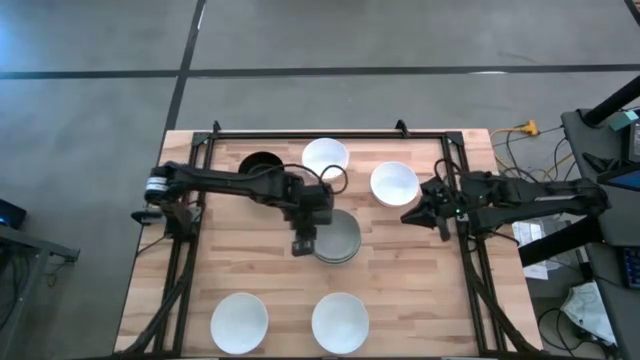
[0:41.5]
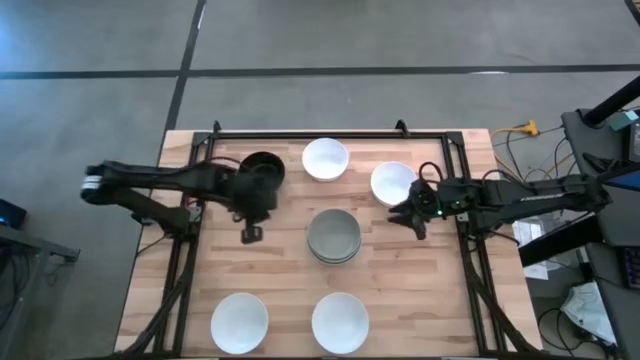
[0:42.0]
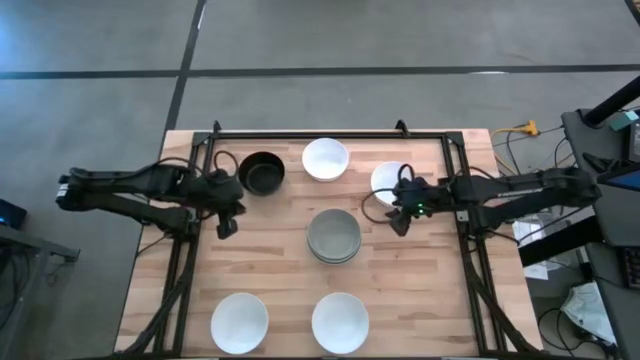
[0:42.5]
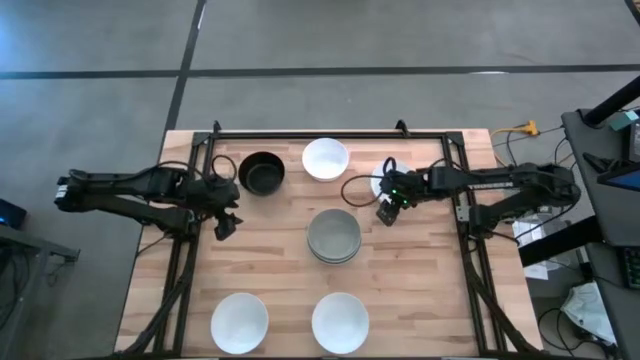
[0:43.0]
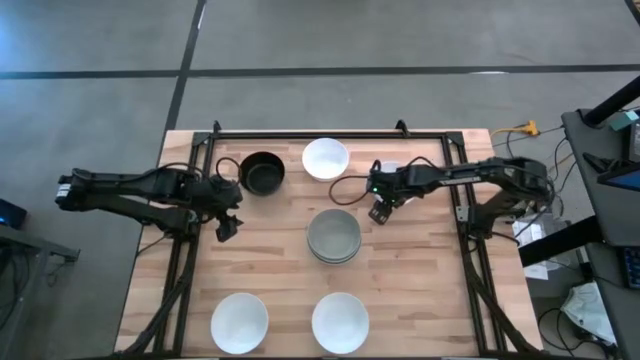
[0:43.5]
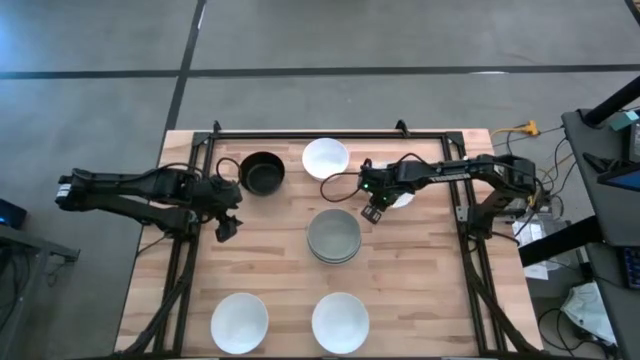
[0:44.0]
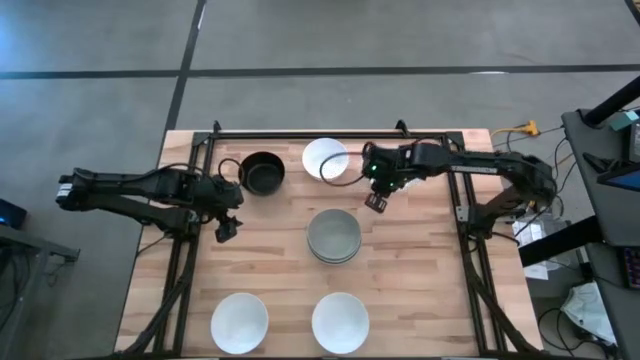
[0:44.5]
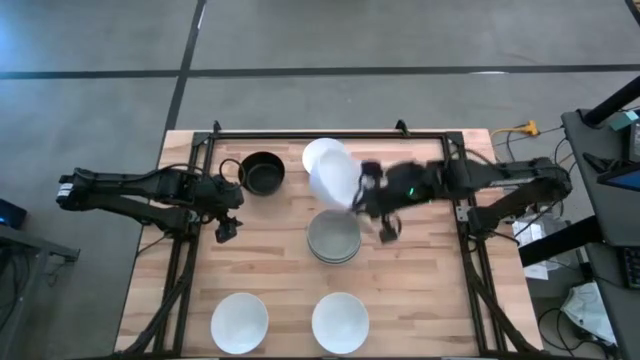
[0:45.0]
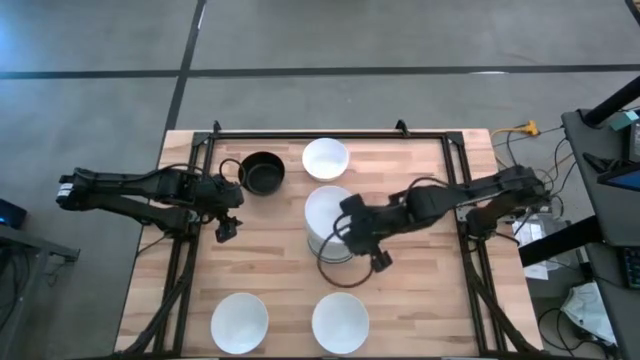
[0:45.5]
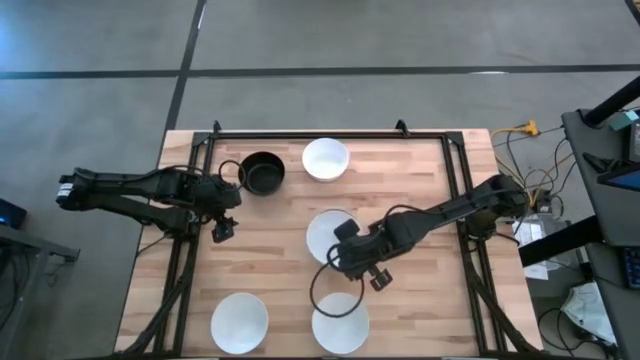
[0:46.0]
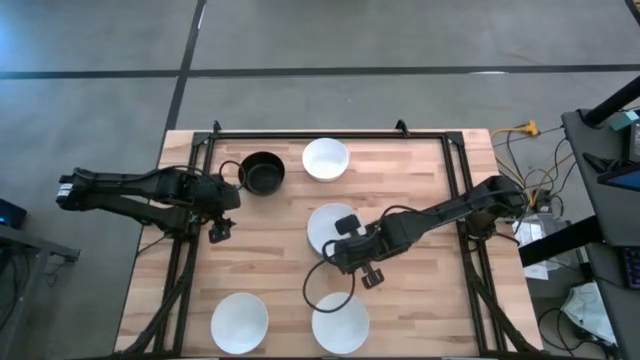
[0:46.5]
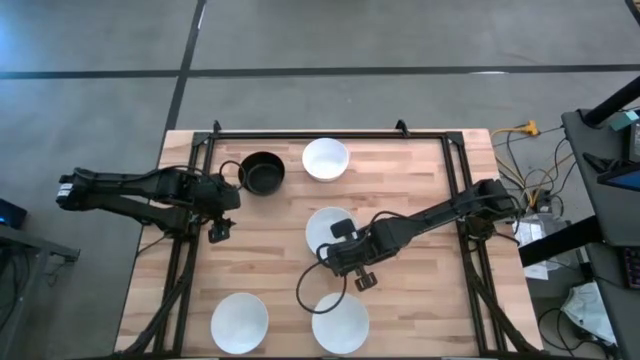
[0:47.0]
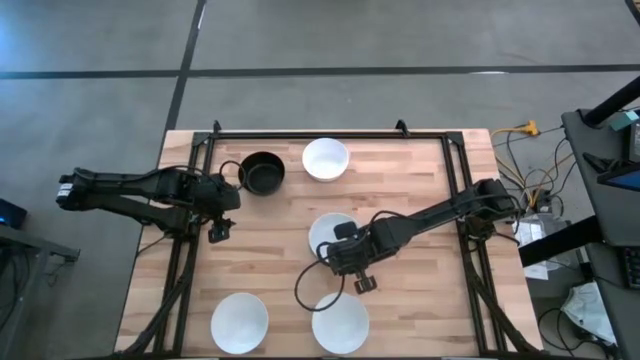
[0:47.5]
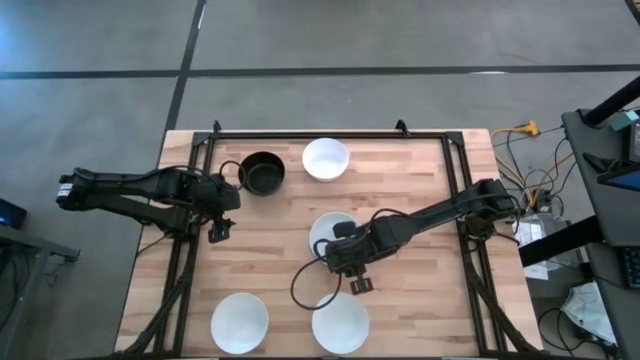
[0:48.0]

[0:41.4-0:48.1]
Task: Nest bowls inside each other
Stack the white bowl on the top of the gray bowl

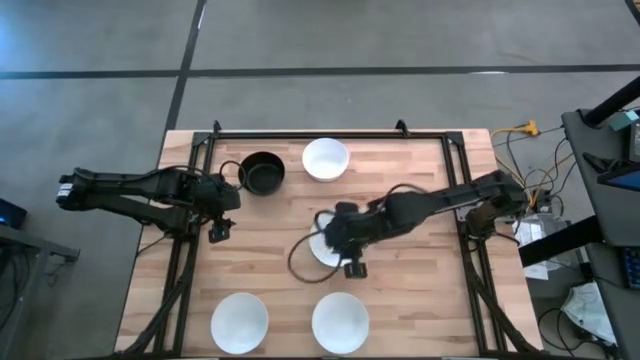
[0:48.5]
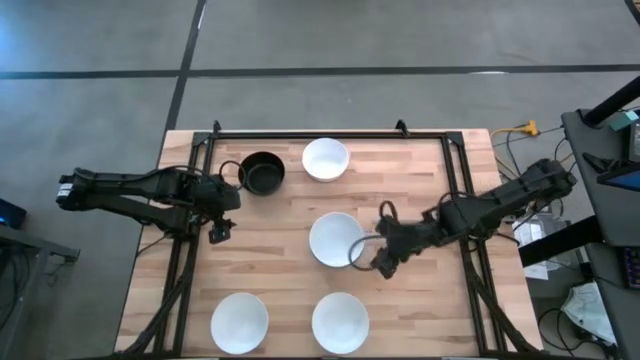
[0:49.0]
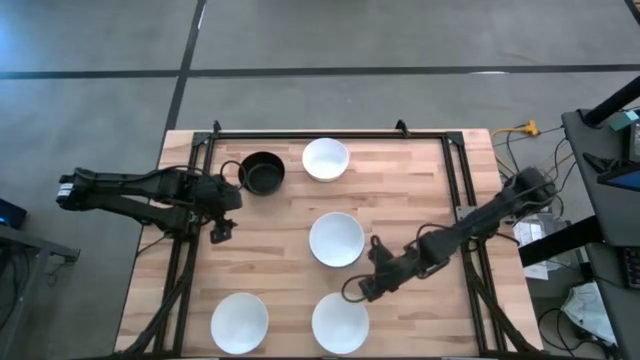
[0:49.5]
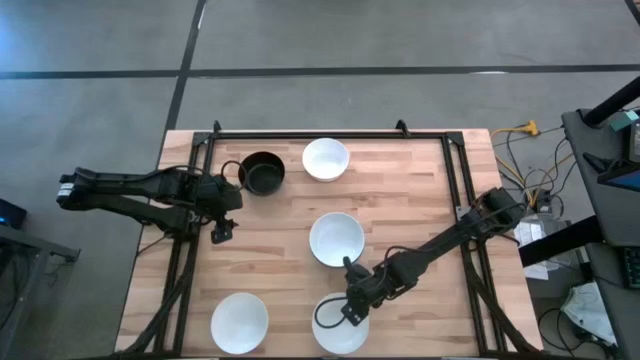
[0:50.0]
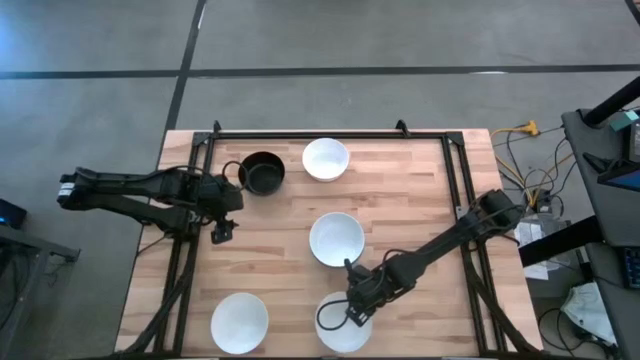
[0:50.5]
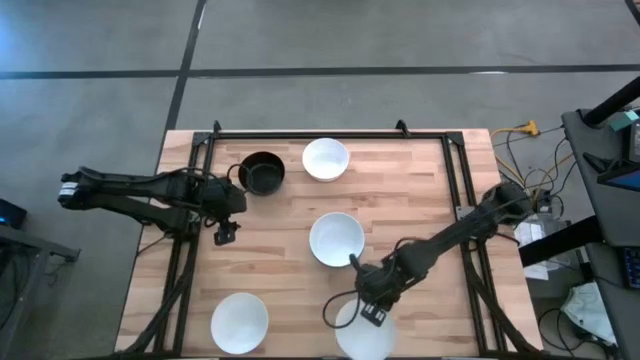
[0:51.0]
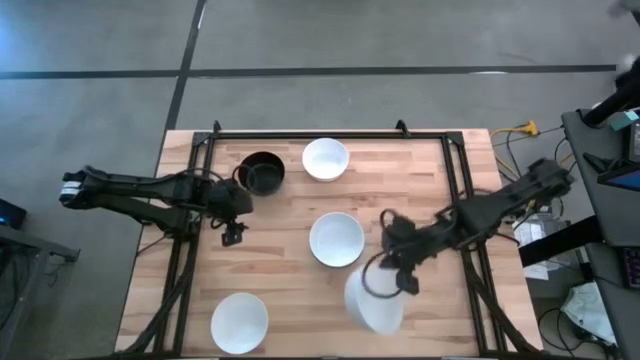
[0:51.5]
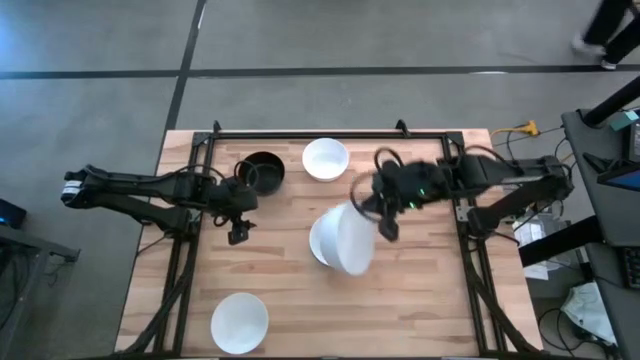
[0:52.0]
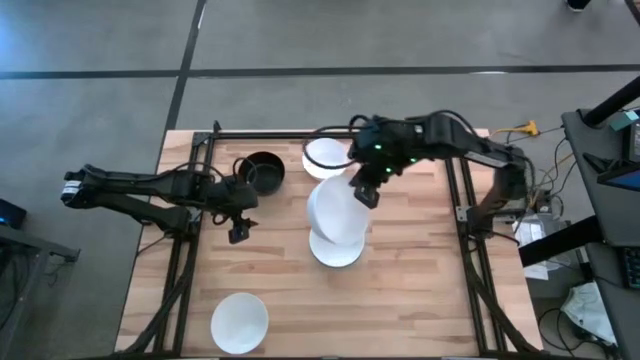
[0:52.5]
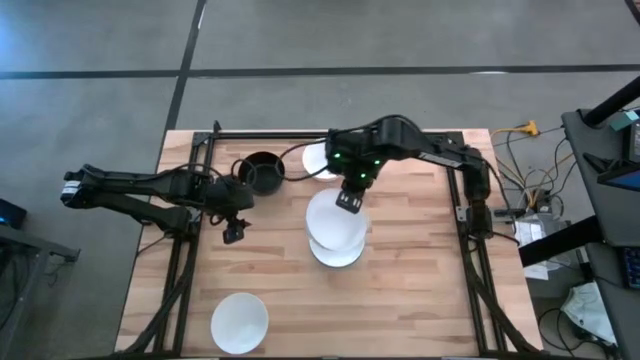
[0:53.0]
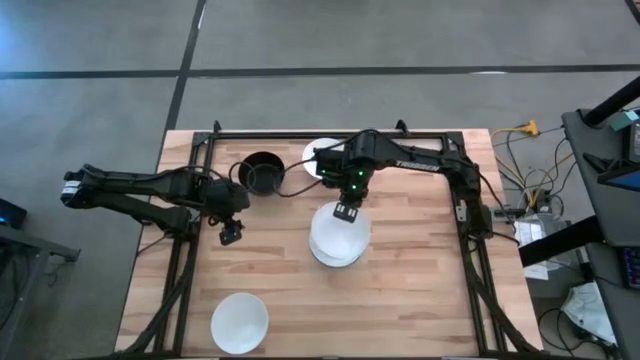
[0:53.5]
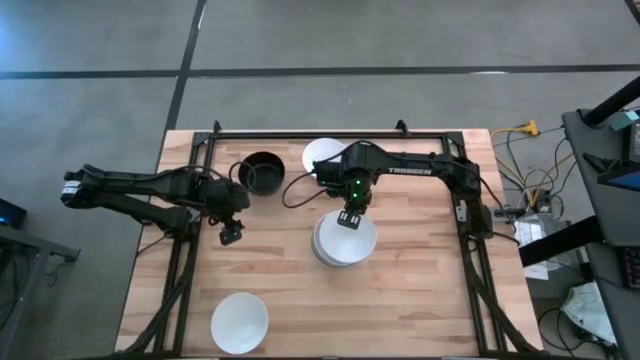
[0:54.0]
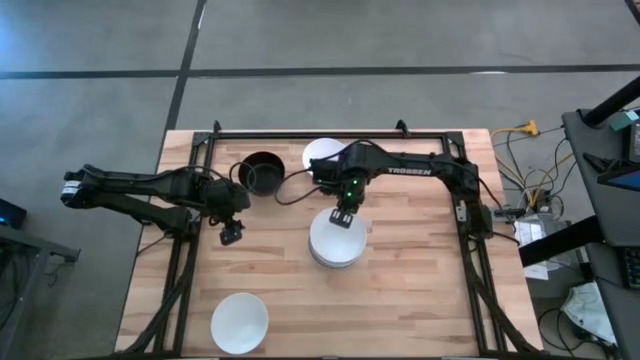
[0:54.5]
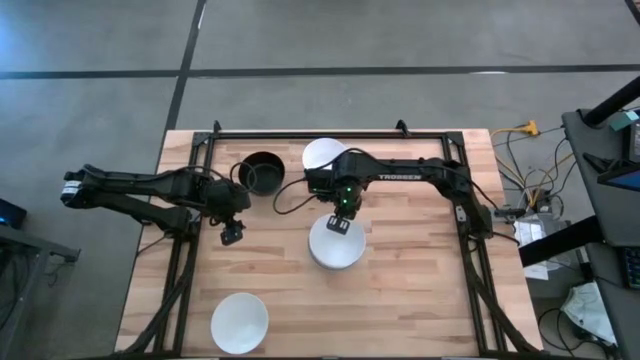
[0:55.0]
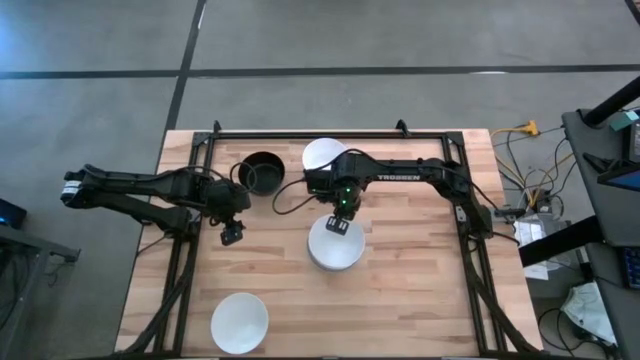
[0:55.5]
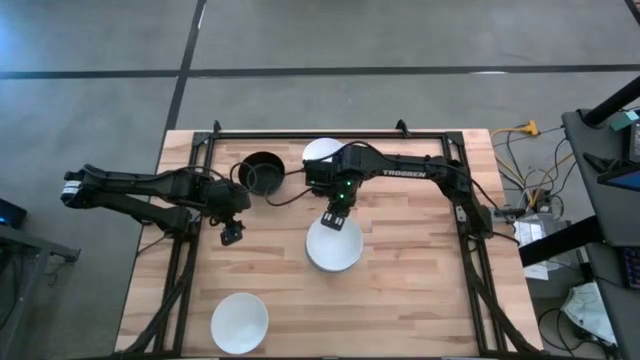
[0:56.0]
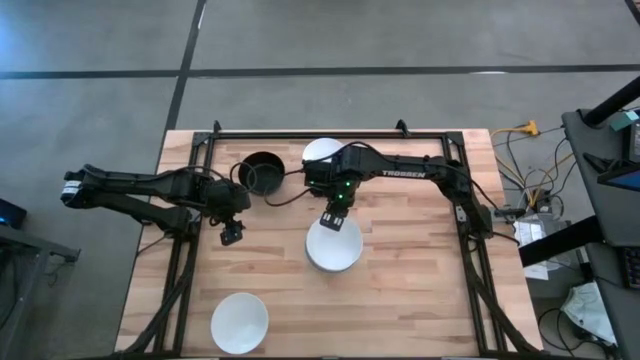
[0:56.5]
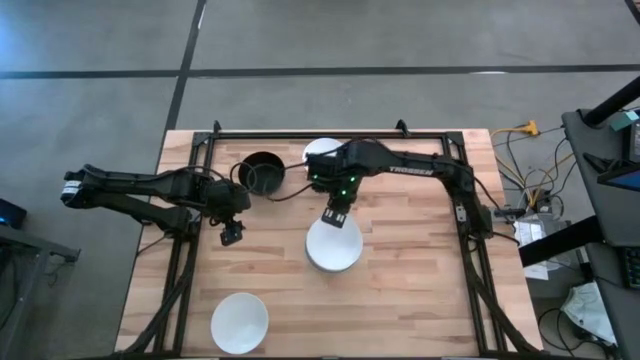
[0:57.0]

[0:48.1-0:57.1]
Stack the white bowl on the top of the white bowl

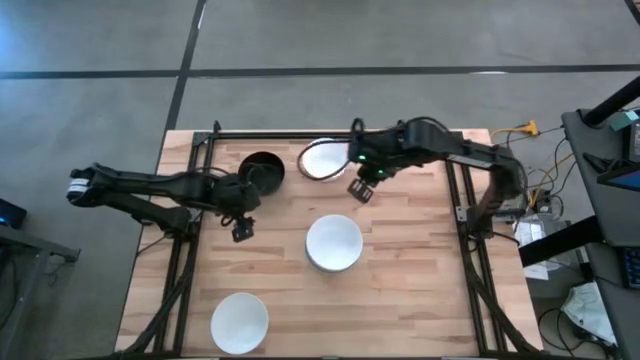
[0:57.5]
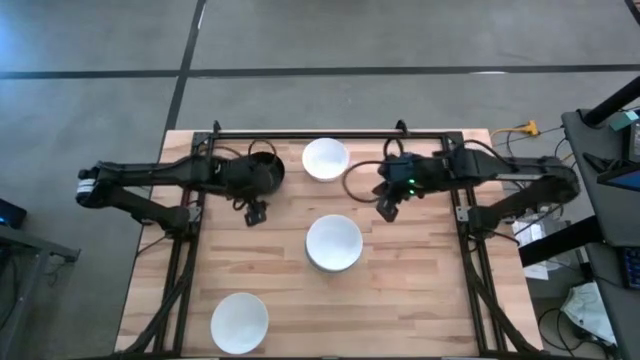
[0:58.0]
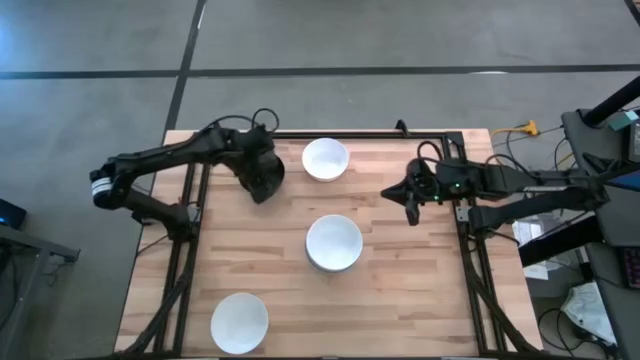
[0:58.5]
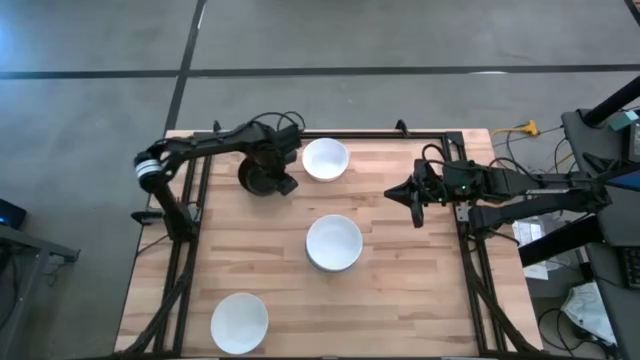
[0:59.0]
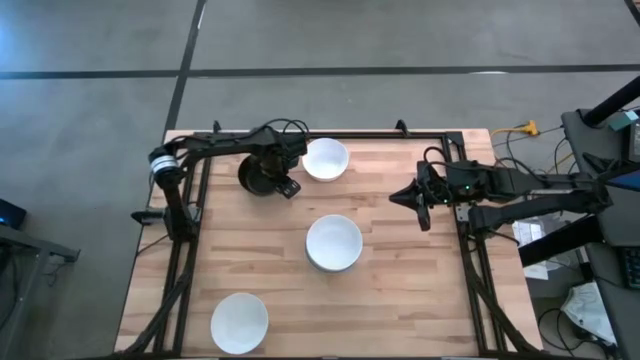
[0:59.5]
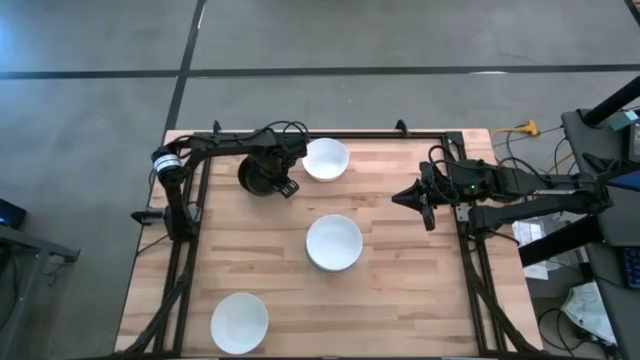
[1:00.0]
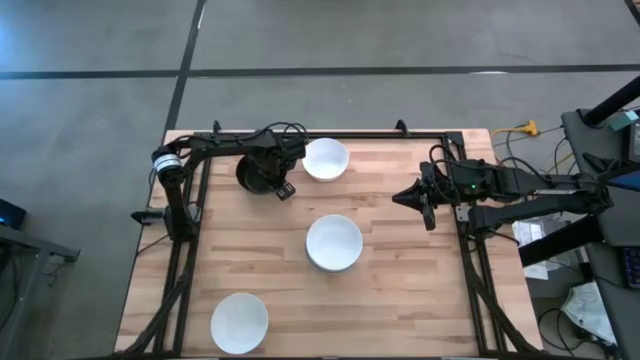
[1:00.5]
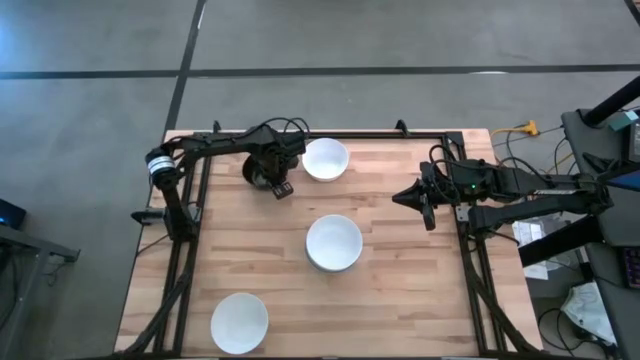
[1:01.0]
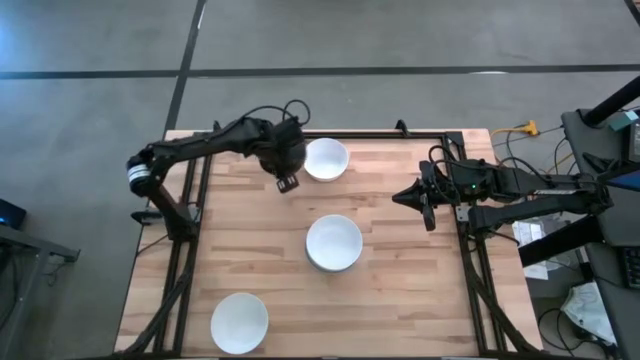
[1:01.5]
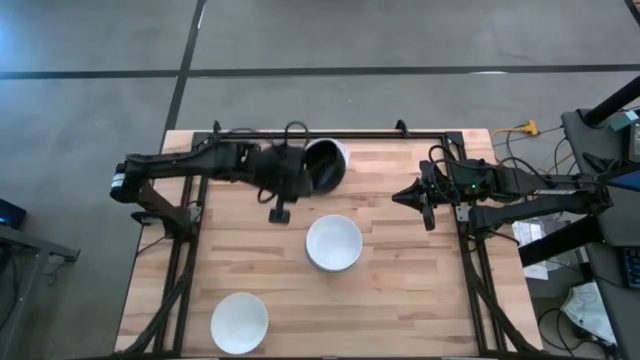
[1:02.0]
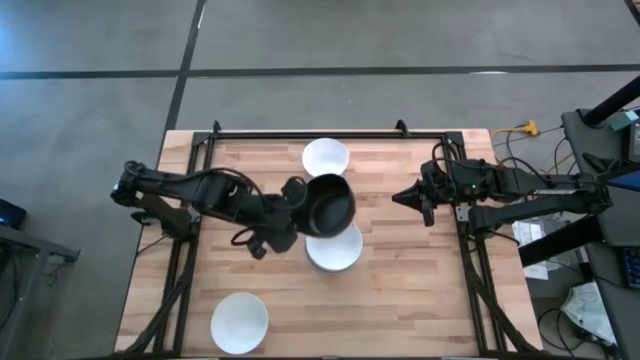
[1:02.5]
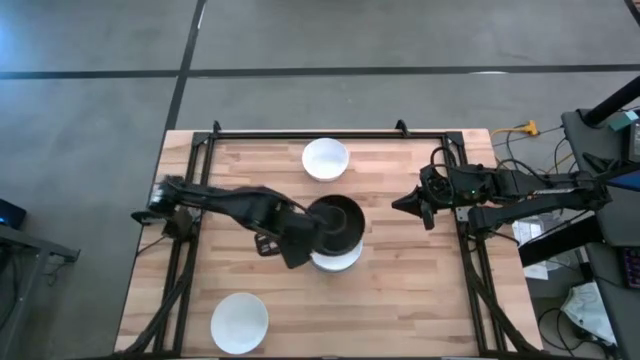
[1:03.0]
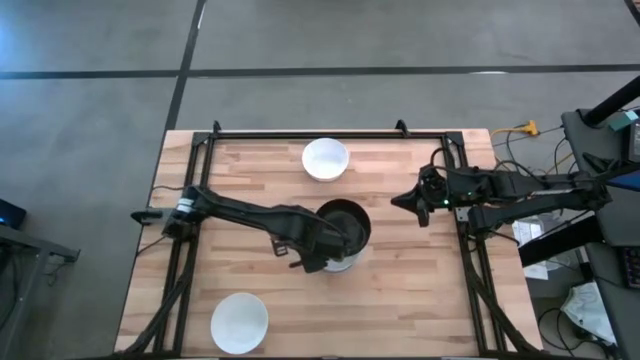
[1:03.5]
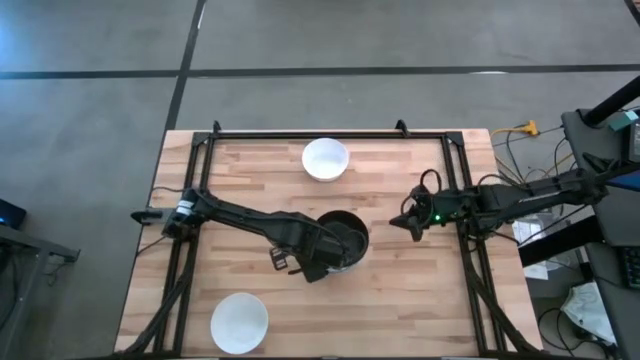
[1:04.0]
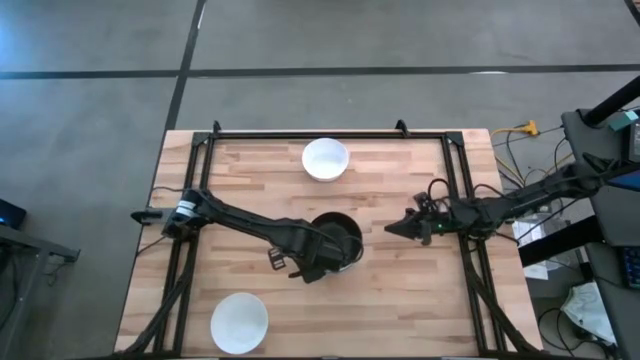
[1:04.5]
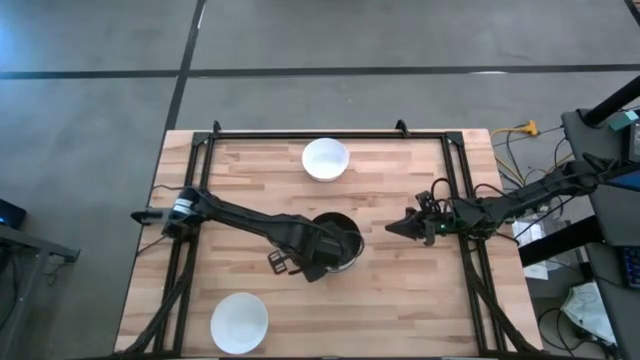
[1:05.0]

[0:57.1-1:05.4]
Stack the black bowl on the top of the white bowl
